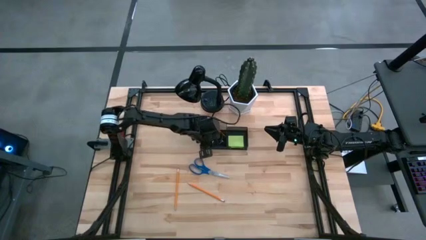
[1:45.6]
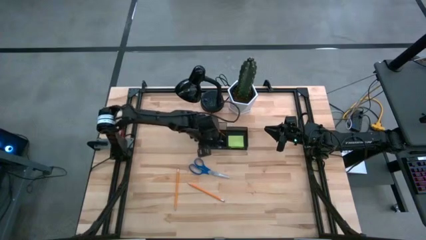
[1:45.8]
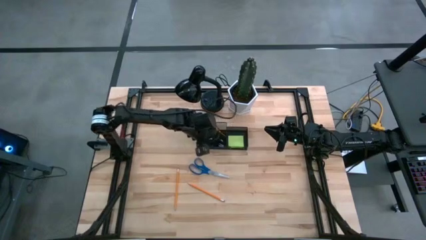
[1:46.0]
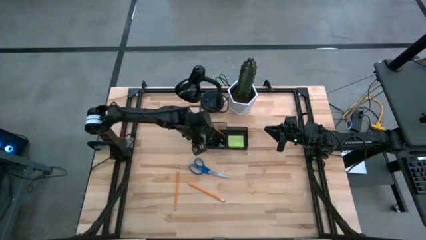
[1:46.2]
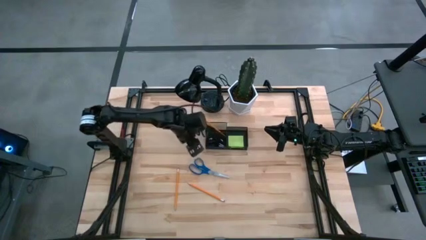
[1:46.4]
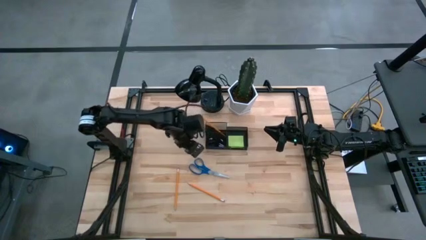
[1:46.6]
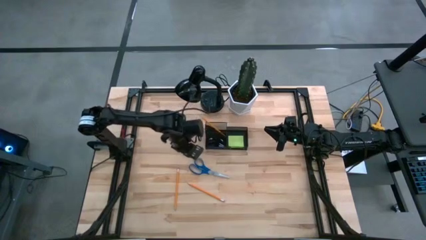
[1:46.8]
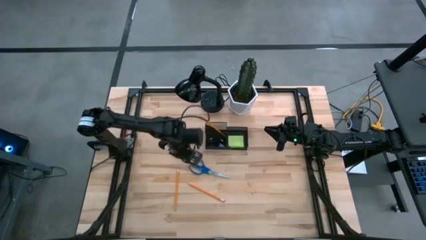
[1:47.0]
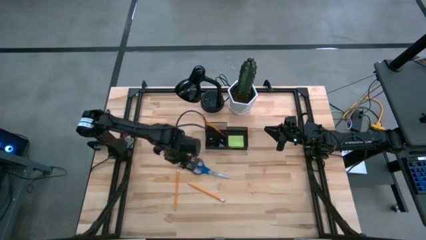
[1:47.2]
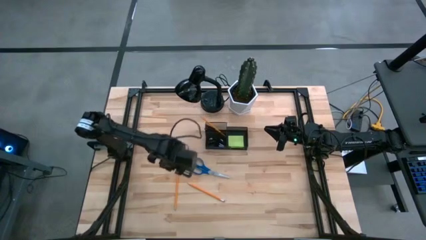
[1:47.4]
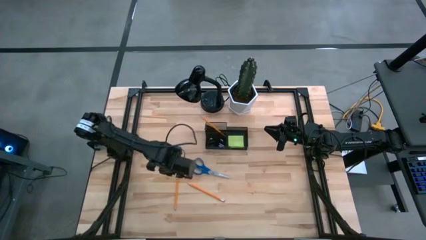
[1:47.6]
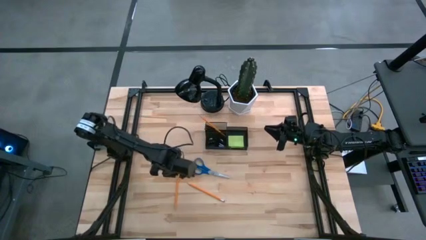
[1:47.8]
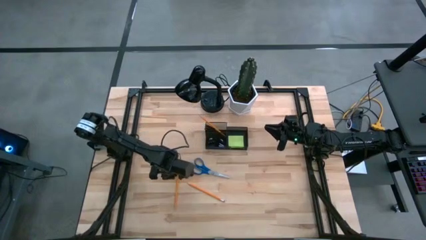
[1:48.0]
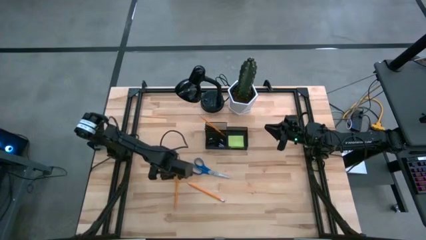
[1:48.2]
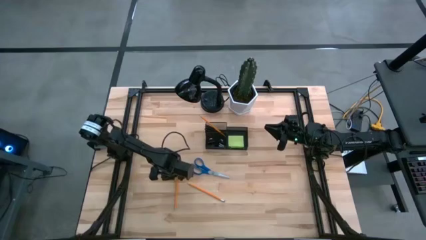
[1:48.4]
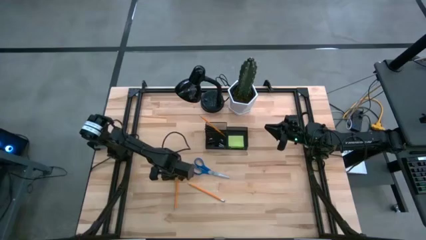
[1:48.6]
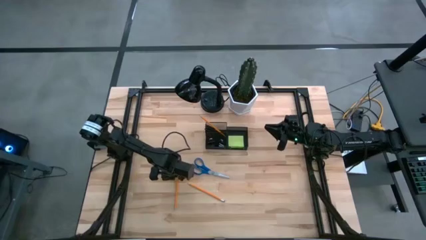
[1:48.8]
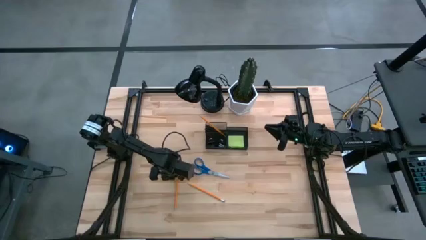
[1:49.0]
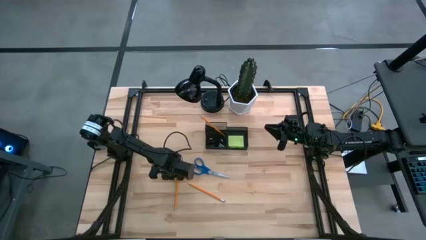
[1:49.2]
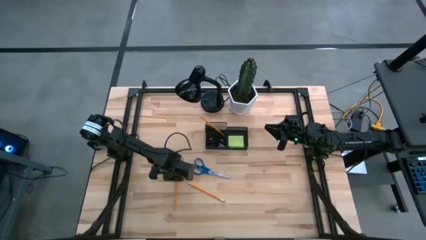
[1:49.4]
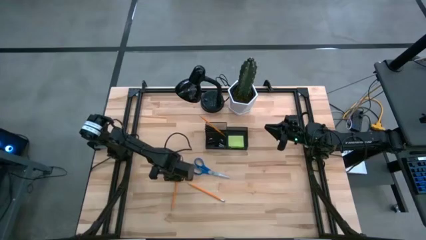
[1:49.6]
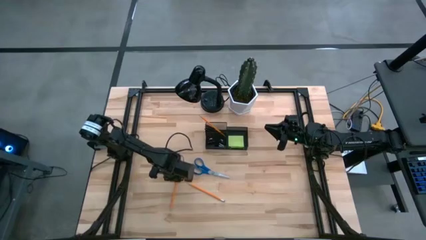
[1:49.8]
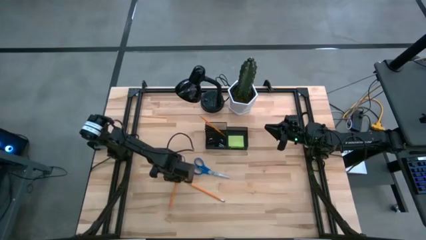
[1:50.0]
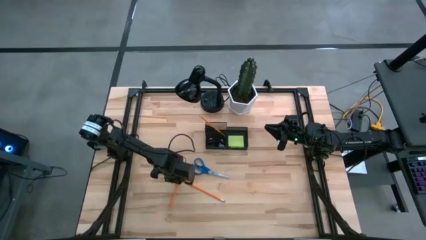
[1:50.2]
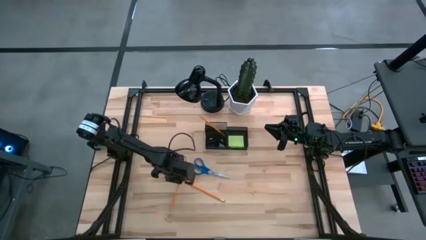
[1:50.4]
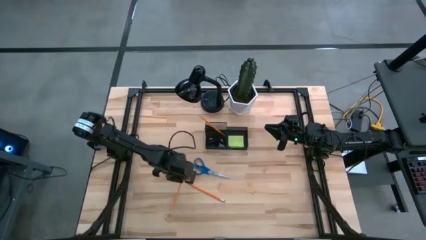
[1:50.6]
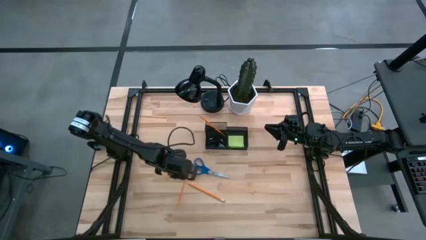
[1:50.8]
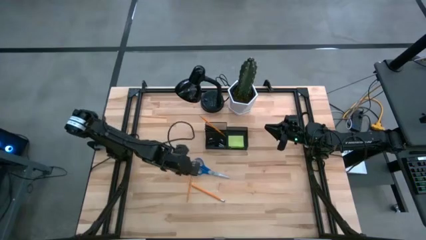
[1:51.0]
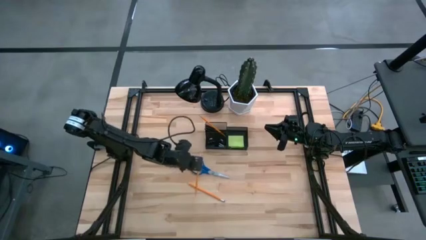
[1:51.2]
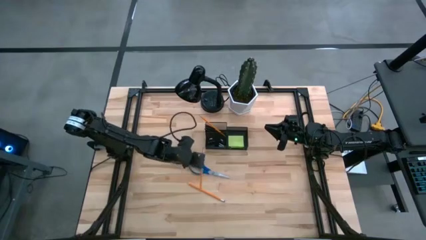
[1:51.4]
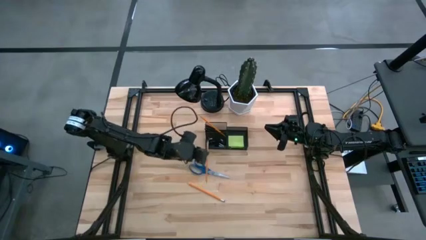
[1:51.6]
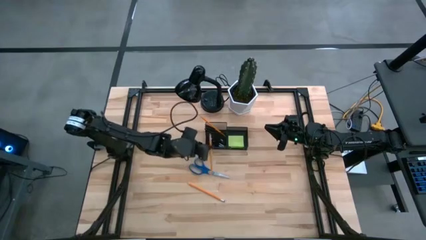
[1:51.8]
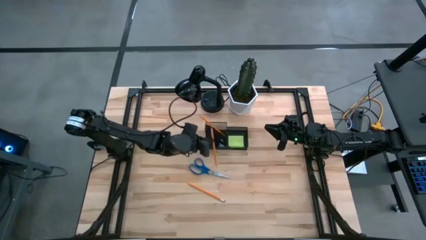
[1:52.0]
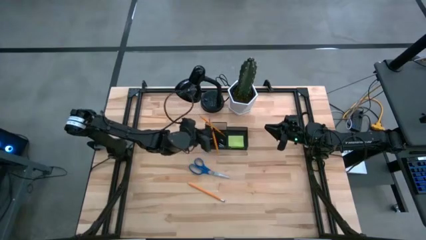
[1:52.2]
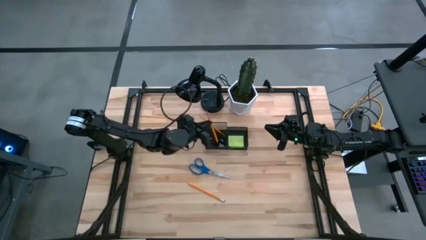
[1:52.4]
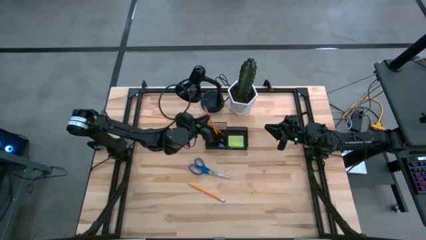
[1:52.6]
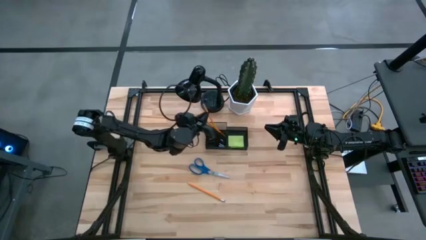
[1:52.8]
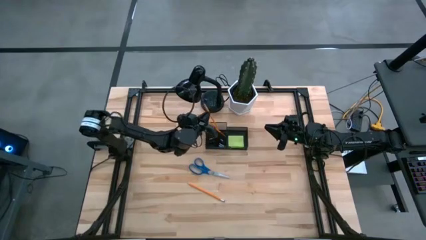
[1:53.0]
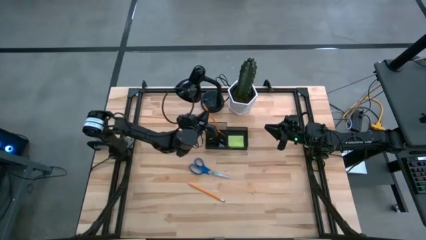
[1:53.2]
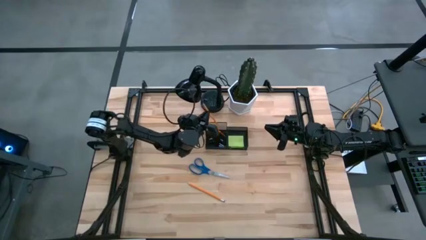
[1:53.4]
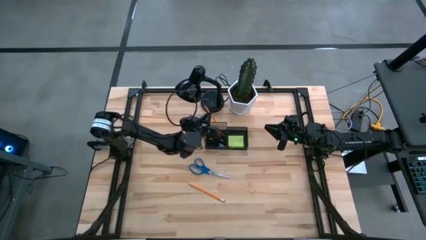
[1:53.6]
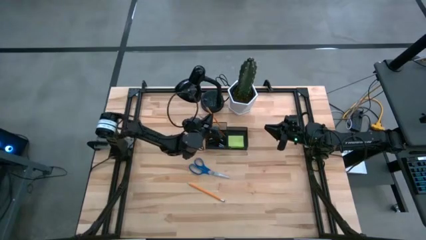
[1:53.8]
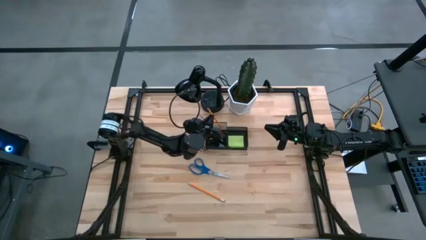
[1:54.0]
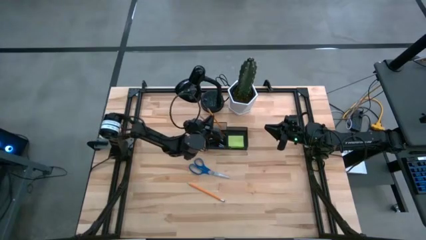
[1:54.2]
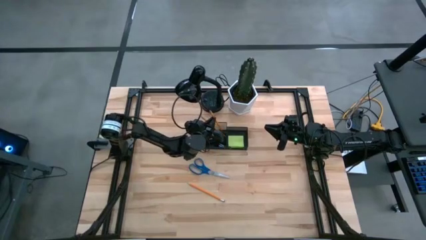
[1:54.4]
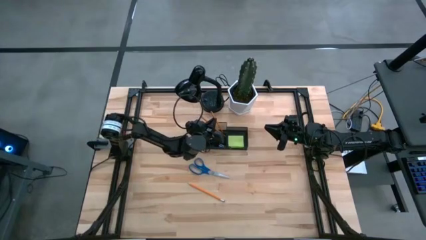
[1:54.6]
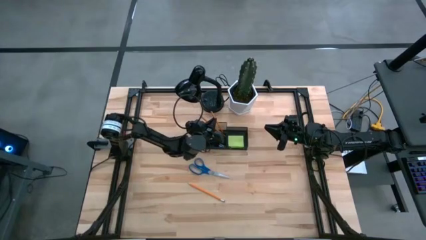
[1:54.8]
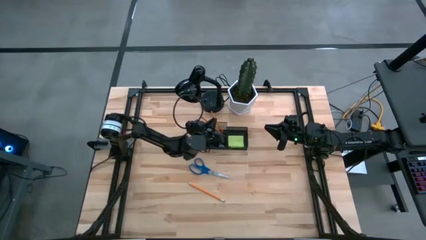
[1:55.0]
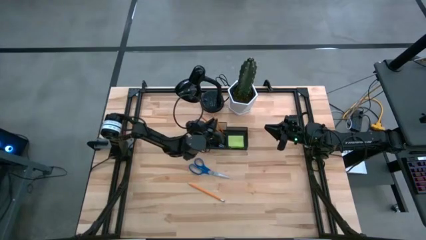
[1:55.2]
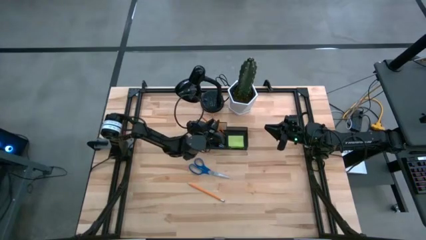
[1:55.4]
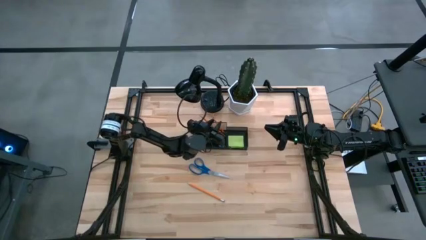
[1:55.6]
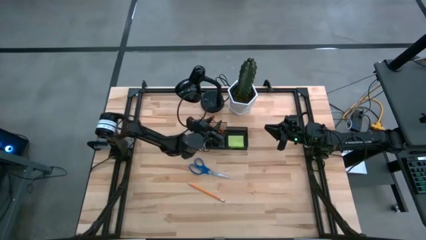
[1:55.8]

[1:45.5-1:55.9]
Task: Pick and place office supplies into organizer
Put the left yellow pencil into the mesh desk organizer
